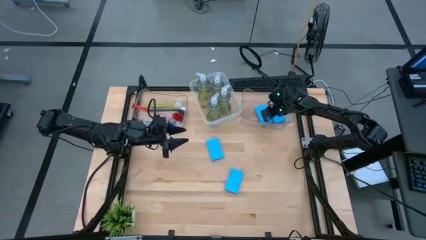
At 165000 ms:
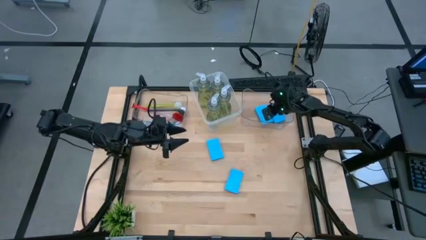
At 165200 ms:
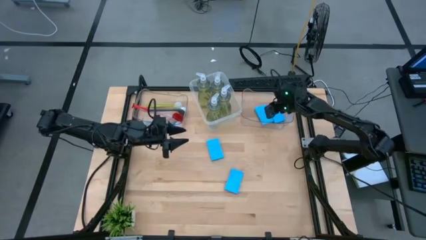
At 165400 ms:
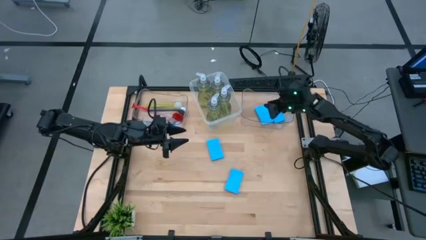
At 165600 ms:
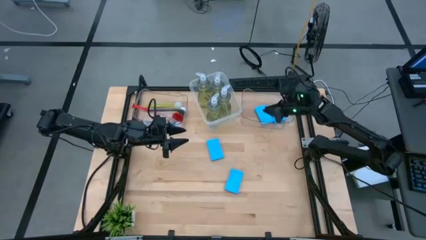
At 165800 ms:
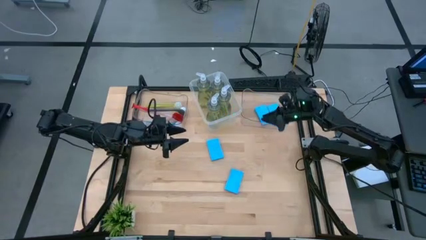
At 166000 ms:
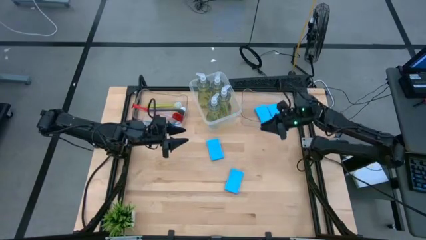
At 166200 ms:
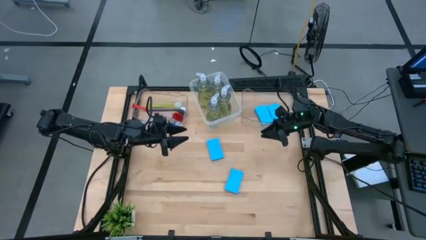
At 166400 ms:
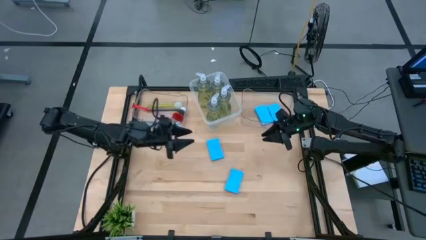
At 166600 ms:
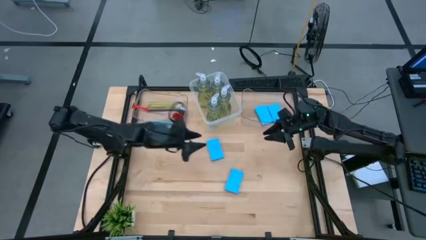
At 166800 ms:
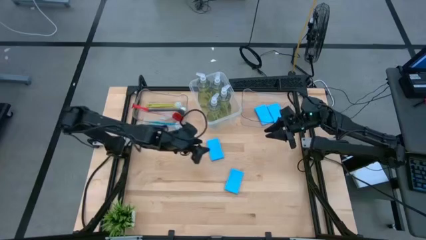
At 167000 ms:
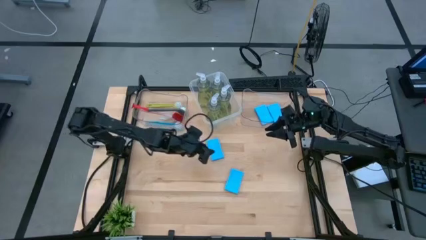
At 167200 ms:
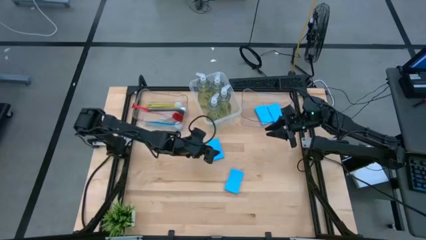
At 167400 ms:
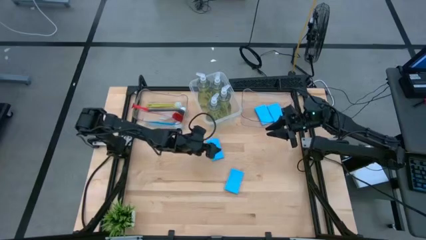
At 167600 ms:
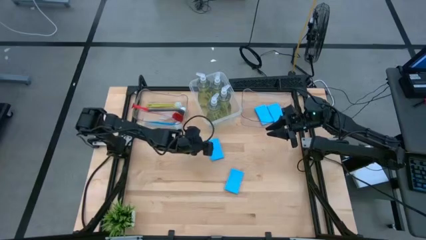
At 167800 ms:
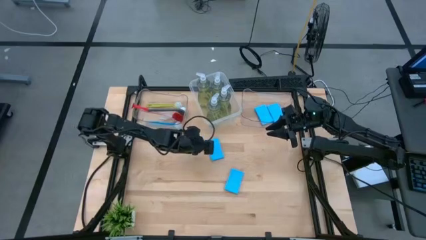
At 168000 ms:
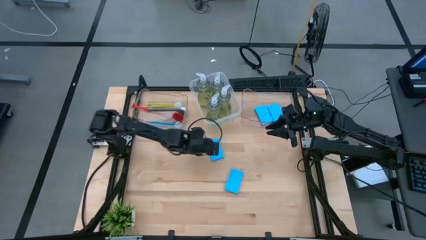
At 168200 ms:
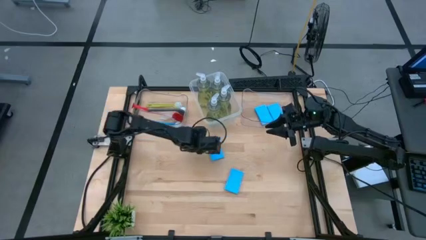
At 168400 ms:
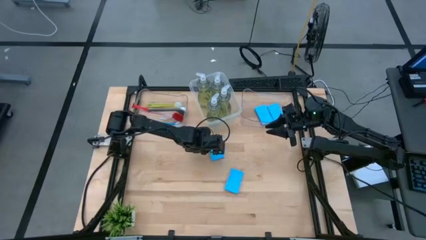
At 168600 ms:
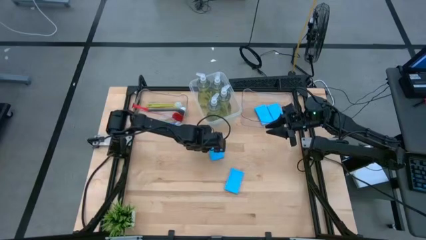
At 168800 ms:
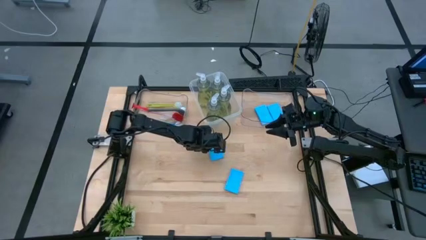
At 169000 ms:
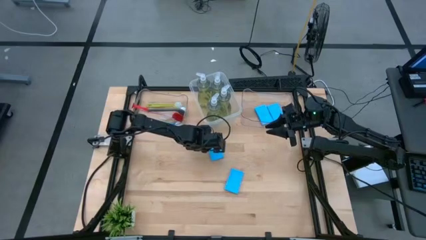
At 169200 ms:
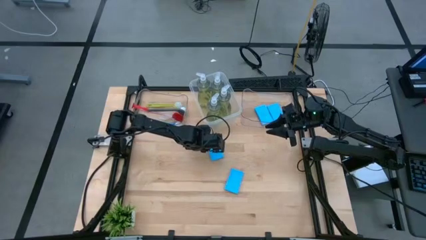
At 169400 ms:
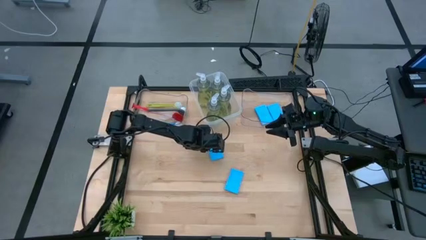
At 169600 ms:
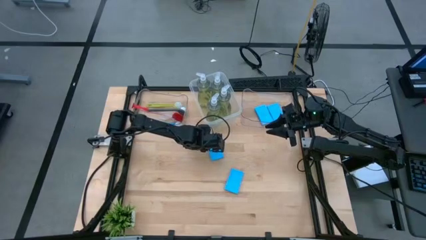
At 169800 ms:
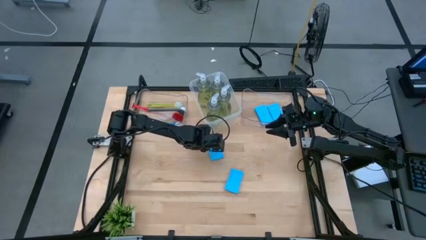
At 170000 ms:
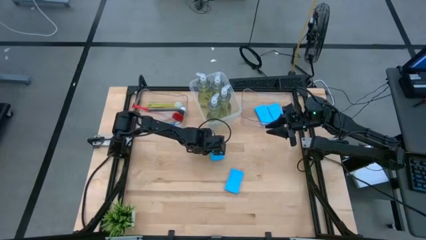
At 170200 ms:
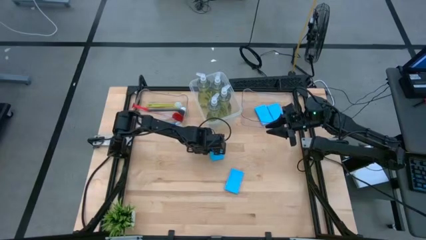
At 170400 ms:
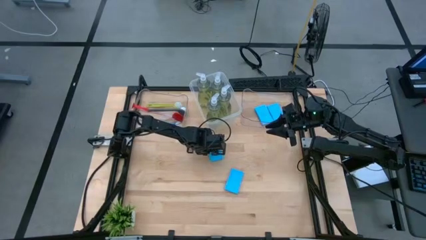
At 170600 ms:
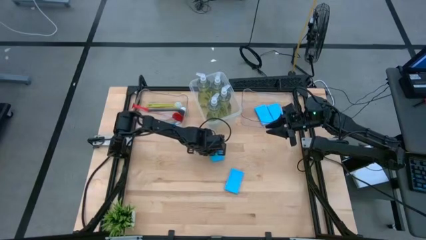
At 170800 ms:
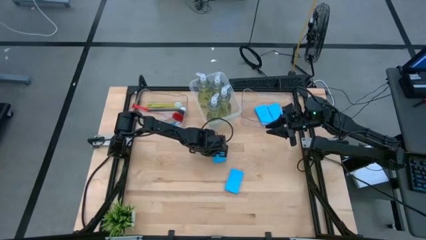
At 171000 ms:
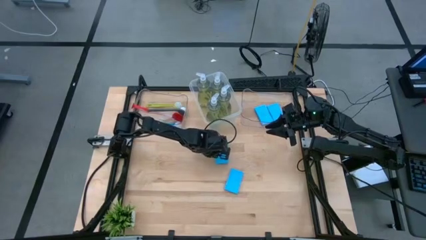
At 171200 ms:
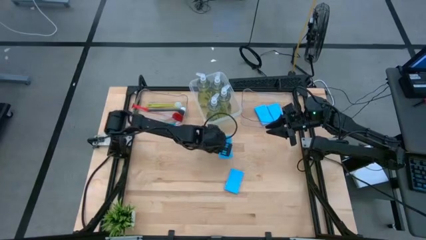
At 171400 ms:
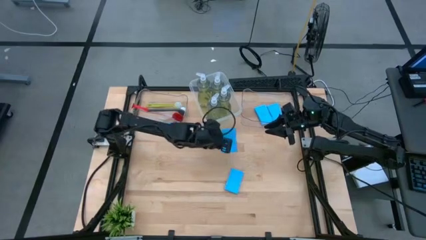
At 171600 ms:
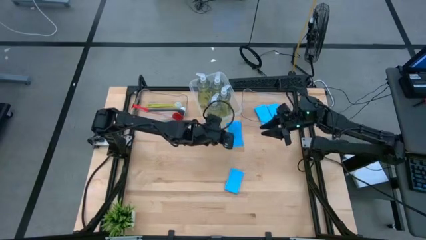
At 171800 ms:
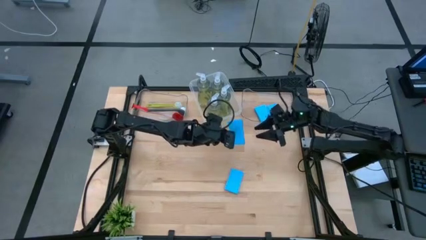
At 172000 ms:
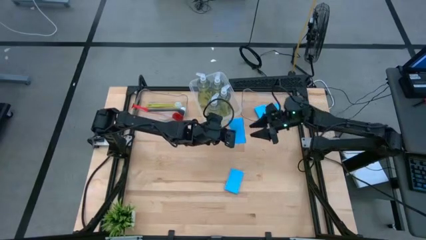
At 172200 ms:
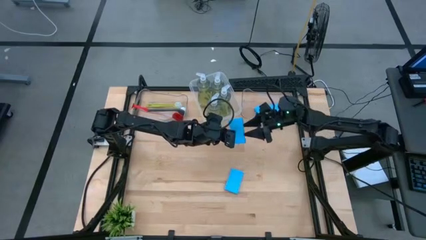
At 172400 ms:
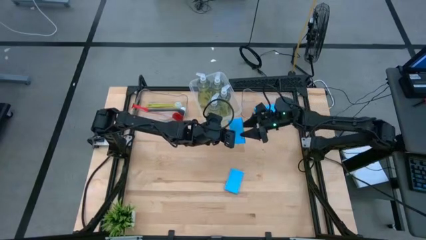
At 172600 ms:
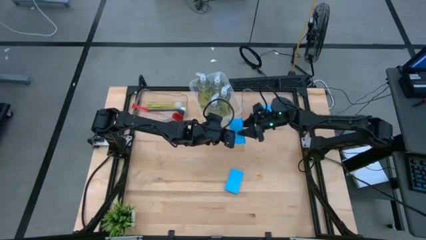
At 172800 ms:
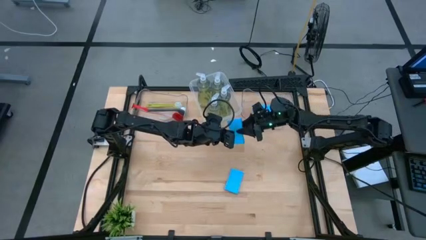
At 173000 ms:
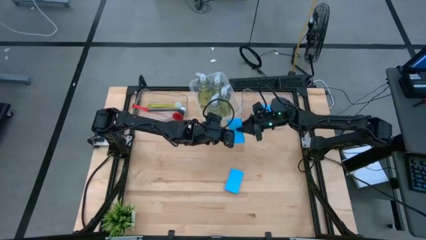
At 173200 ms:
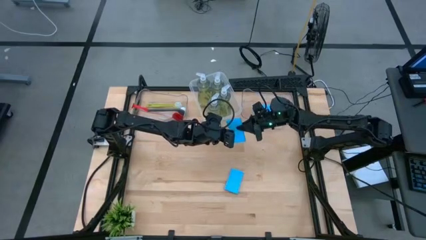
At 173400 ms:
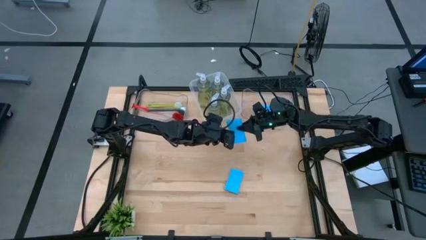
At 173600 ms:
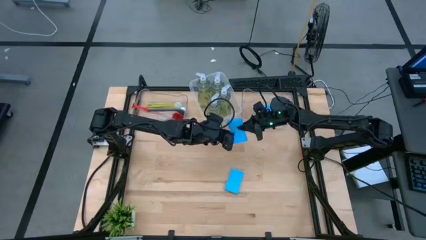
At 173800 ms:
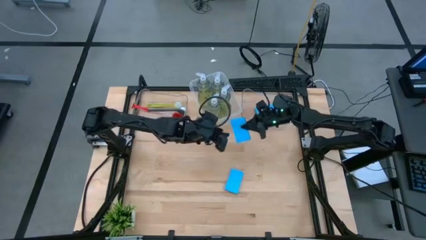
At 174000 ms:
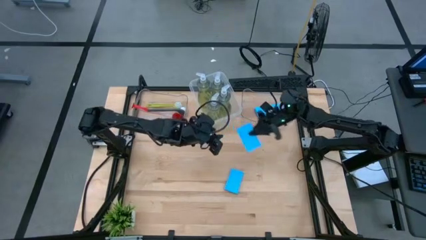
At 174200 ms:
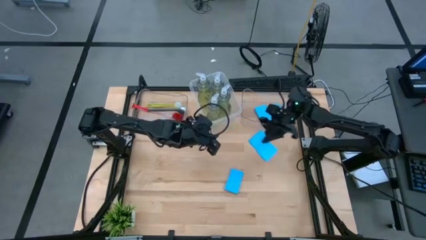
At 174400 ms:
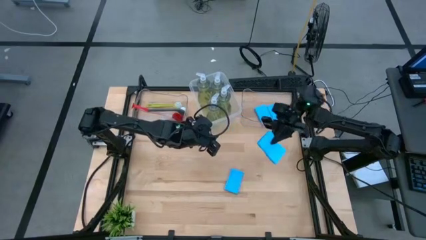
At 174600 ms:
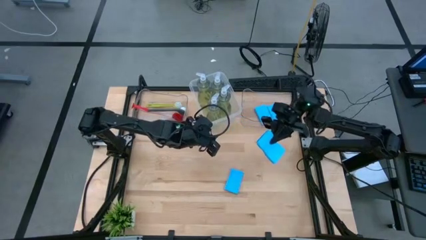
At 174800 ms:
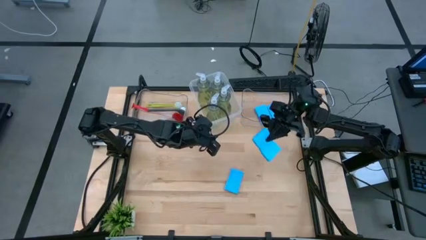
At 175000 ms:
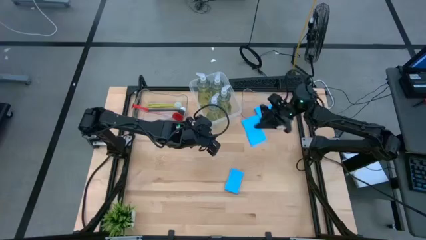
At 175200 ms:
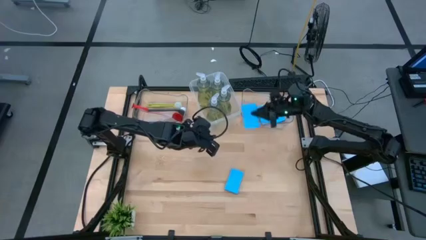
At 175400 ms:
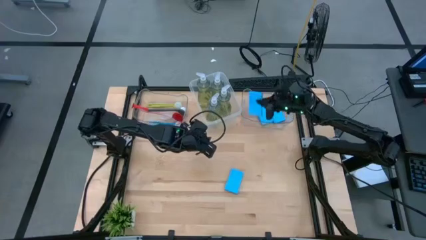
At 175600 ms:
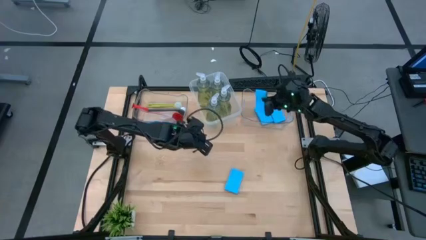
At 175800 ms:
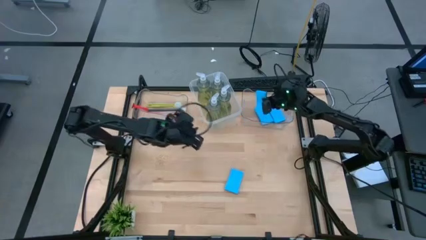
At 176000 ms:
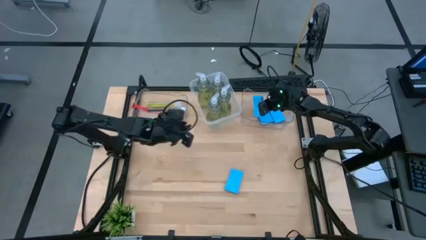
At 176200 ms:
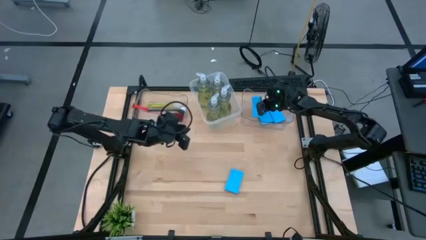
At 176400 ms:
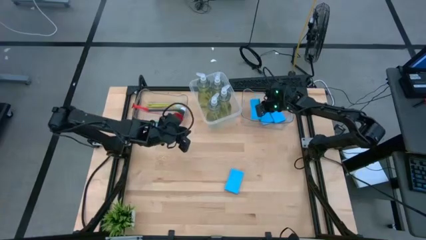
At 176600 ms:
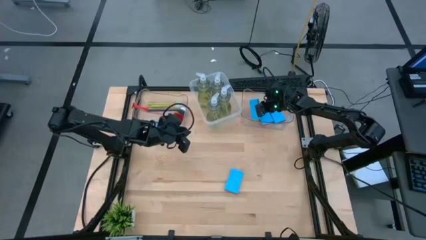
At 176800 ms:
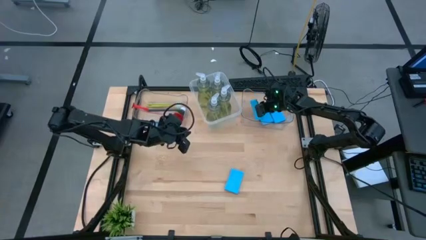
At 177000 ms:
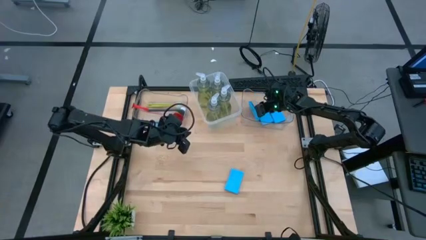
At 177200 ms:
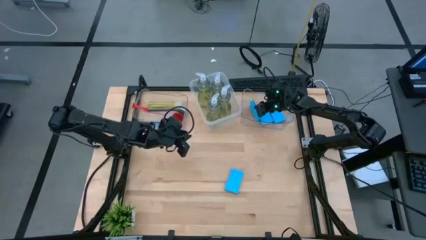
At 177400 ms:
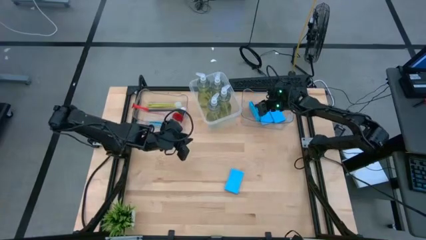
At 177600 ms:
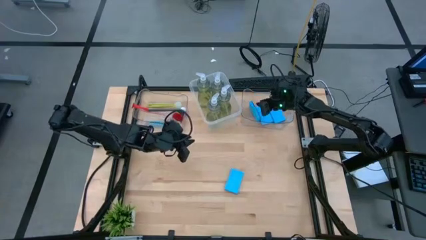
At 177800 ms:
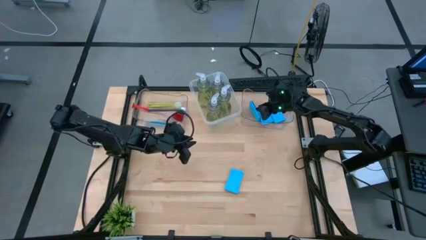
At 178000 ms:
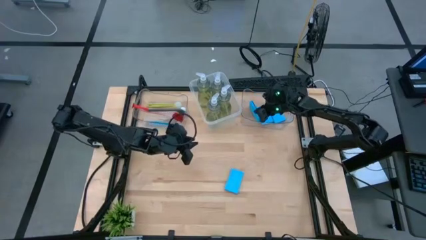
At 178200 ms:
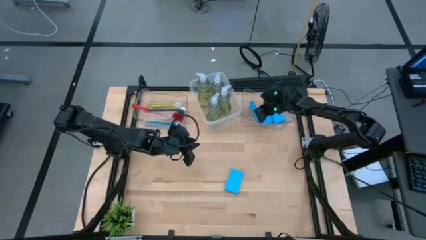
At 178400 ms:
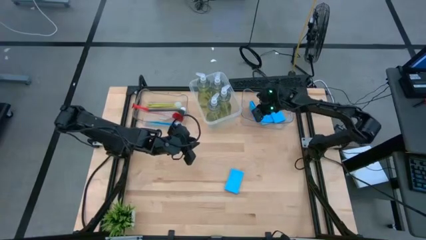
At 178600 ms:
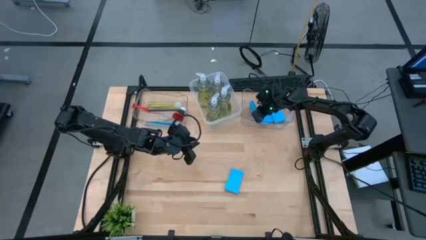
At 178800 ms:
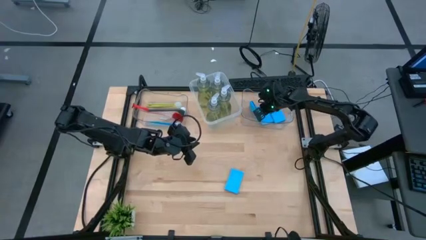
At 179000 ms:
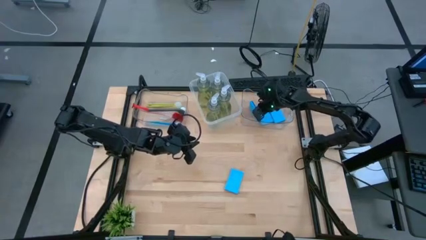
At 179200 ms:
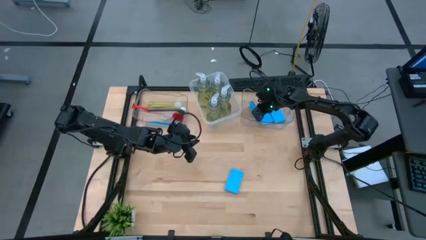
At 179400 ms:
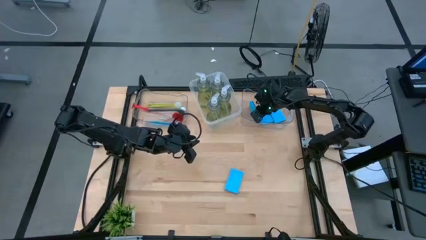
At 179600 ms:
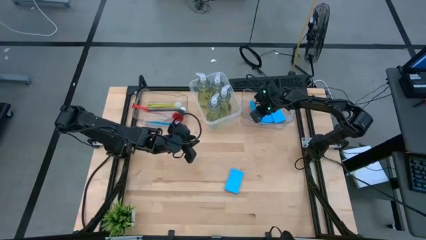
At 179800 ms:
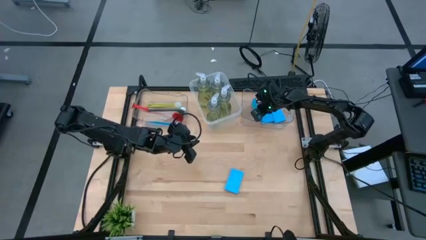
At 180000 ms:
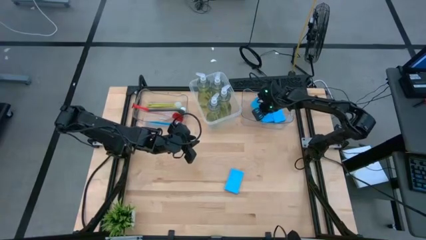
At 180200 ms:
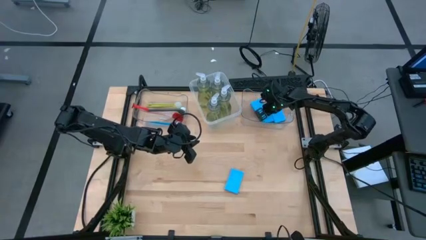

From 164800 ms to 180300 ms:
Task: Pick & Place Kitchen Sink Supplies
Put the blue sponge into the right transparent bin
